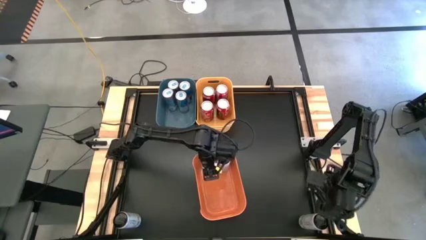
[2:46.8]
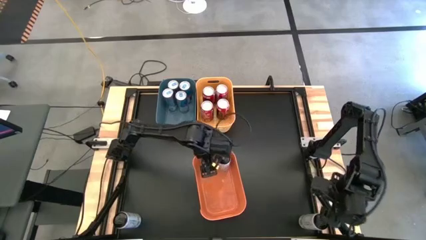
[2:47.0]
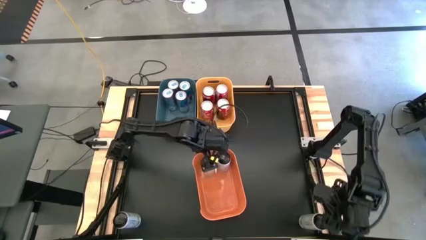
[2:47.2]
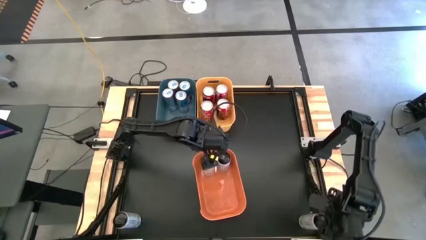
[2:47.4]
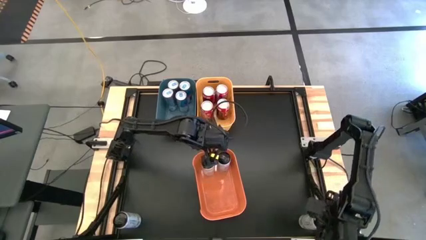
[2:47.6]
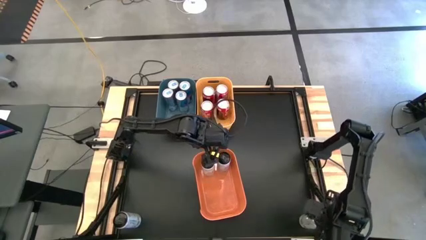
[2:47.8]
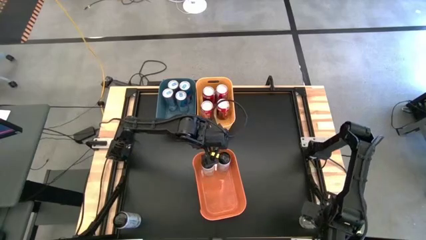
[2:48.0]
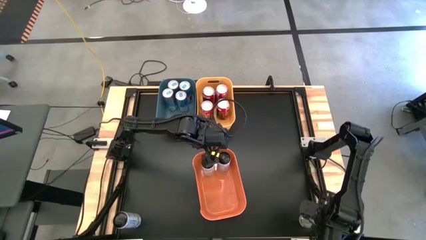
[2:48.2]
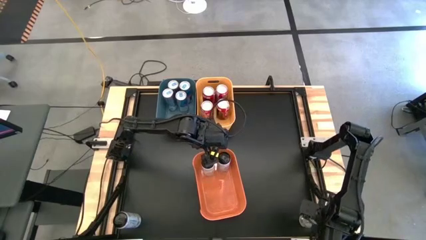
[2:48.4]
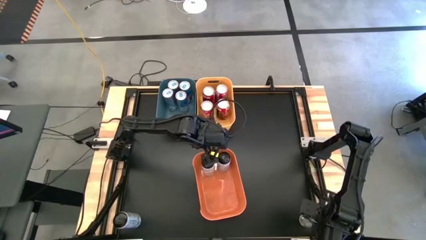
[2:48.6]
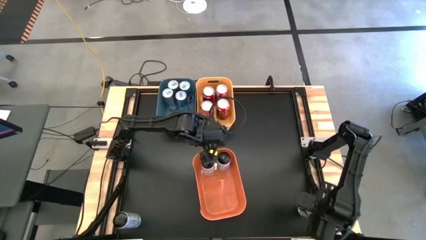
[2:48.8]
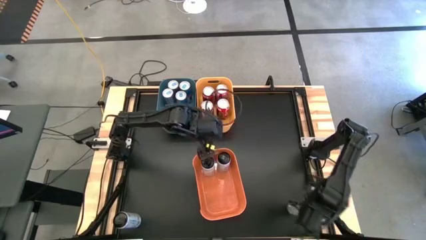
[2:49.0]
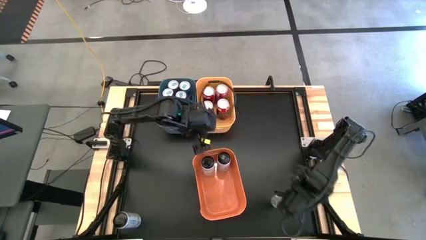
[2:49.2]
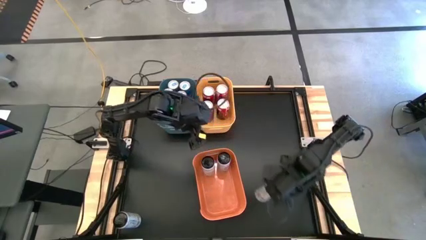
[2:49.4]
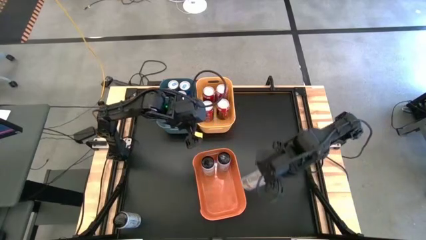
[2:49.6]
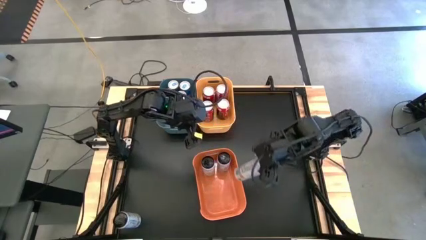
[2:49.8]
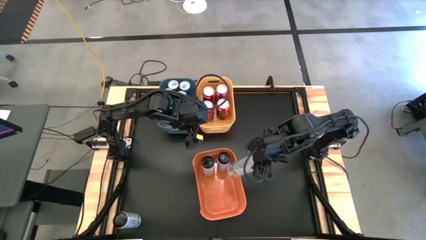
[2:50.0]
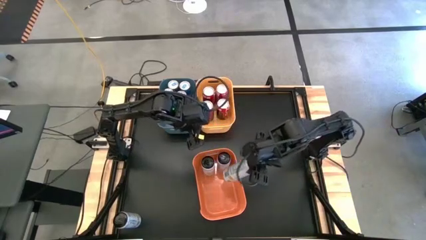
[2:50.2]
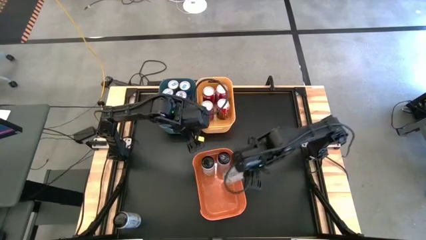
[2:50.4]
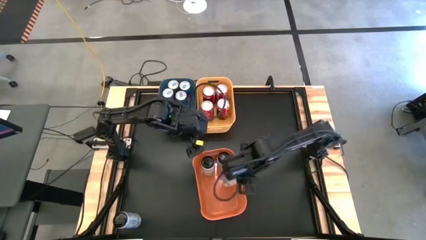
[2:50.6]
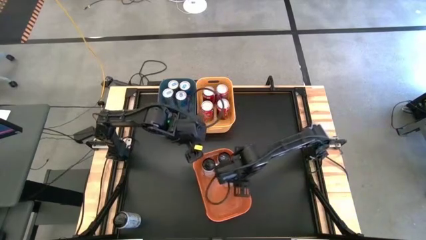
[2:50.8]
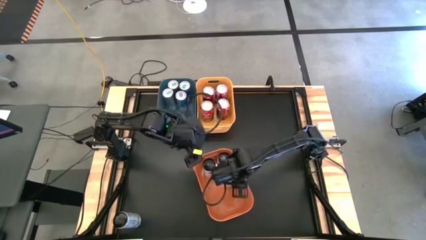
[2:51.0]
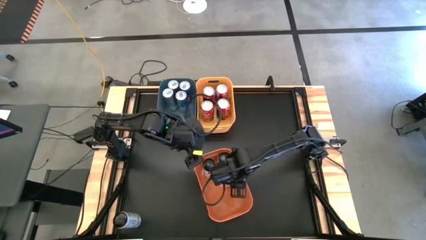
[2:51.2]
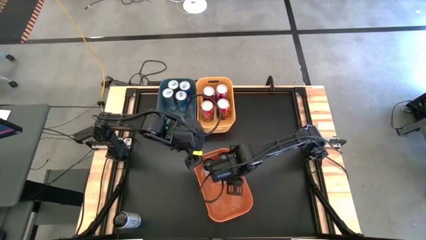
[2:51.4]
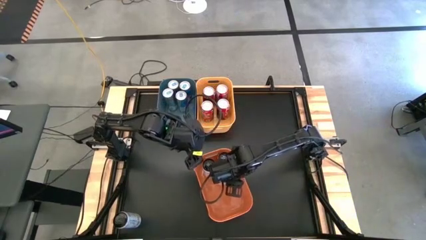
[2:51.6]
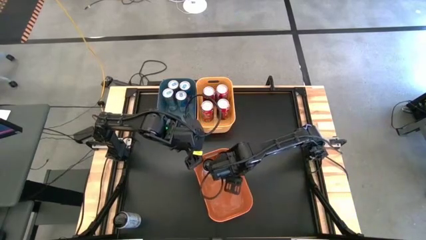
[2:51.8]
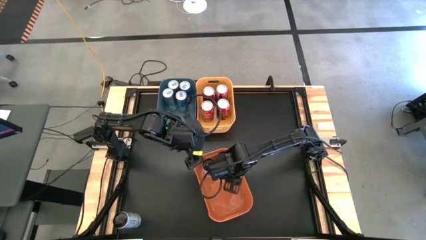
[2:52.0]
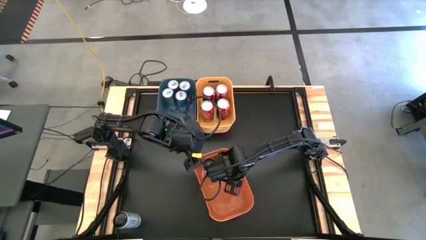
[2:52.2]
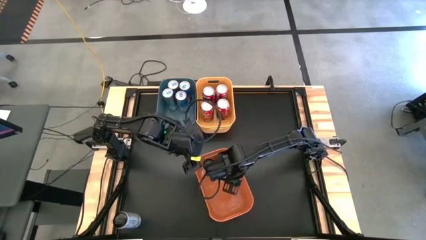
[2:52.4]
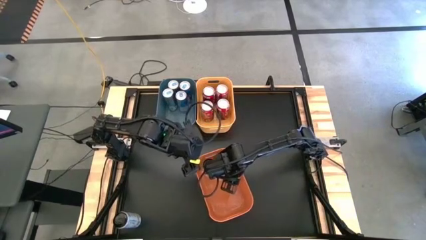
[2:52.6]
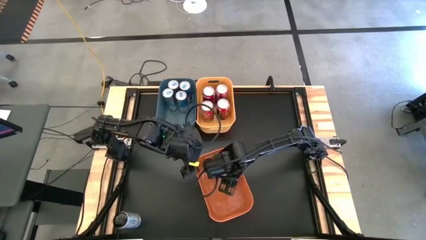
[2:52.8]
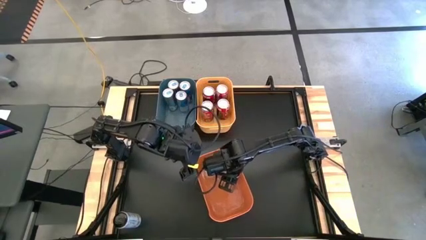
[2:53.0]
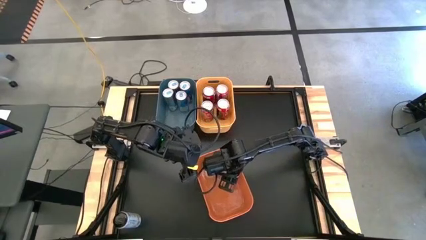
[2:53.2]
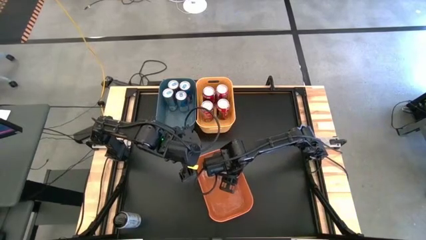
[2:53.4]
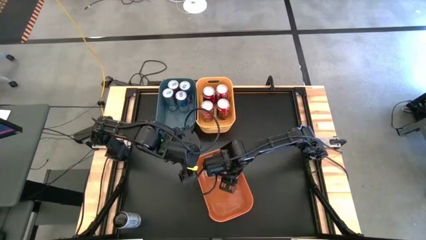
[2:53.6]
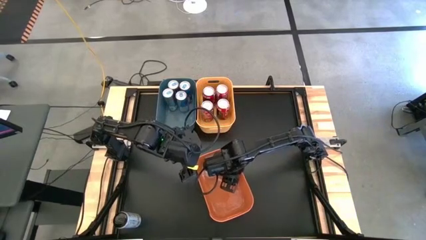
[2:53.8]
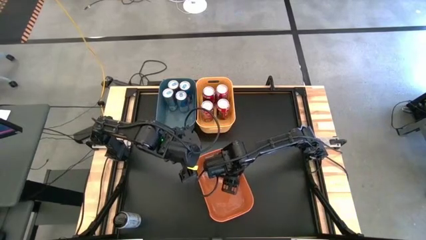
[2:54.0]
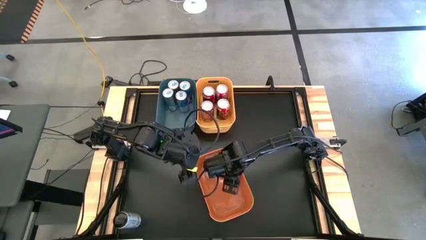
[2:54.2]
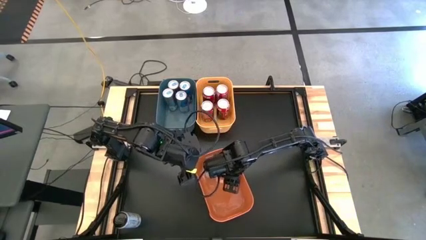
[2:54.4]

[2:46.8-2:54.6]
Task: Sort soda cans
Put the right white soda can into the orange bin

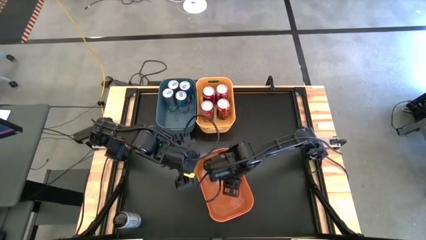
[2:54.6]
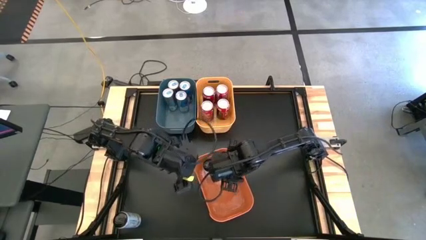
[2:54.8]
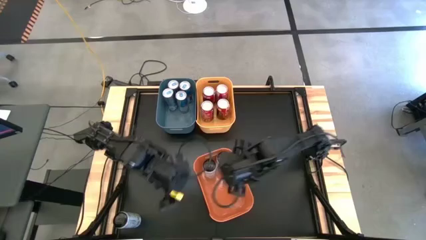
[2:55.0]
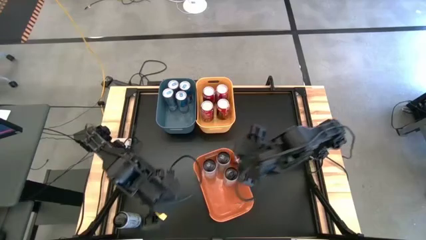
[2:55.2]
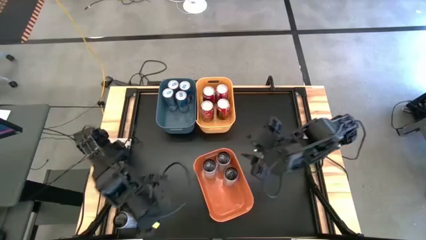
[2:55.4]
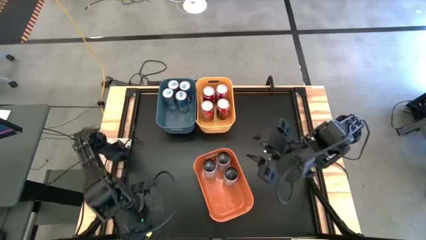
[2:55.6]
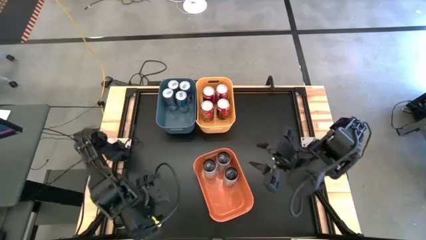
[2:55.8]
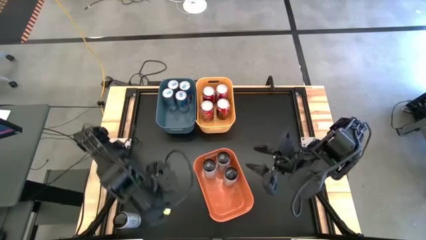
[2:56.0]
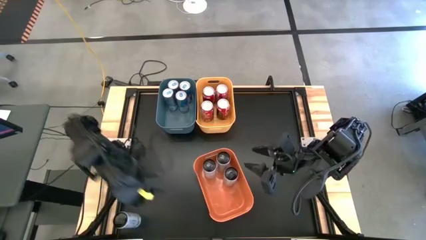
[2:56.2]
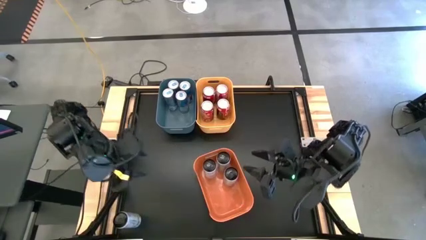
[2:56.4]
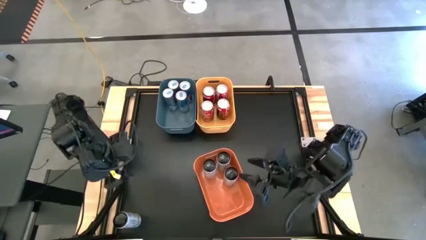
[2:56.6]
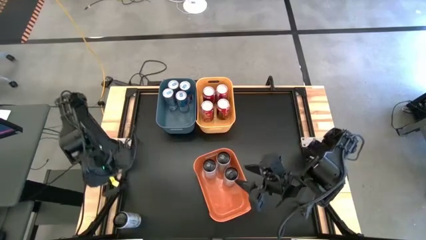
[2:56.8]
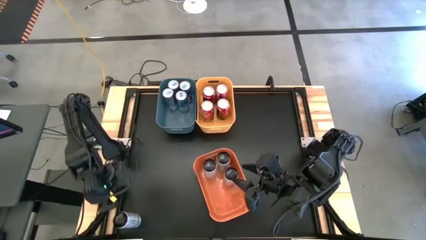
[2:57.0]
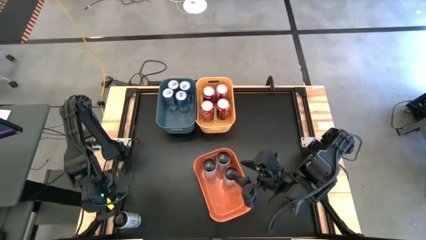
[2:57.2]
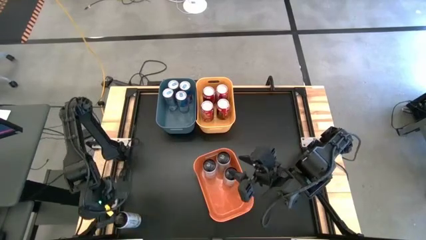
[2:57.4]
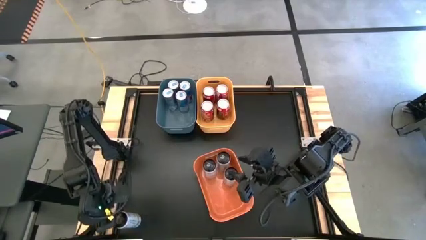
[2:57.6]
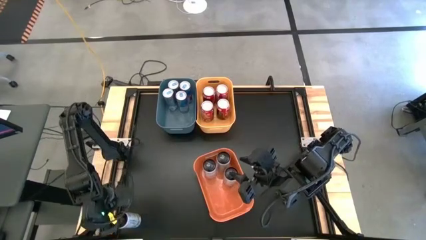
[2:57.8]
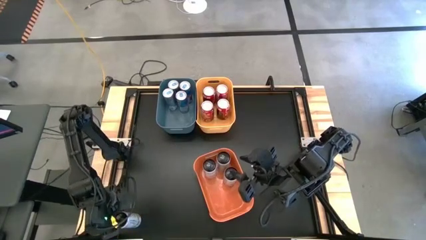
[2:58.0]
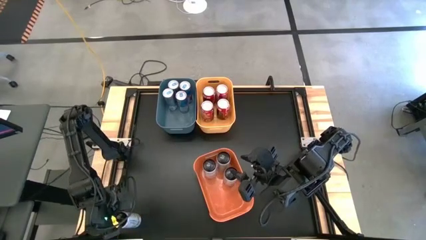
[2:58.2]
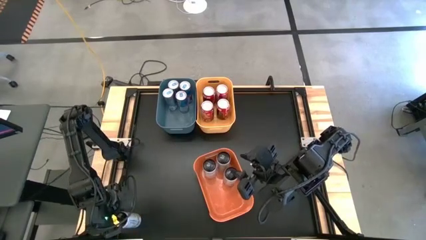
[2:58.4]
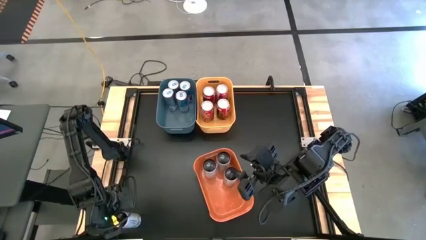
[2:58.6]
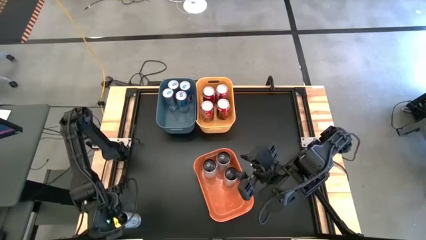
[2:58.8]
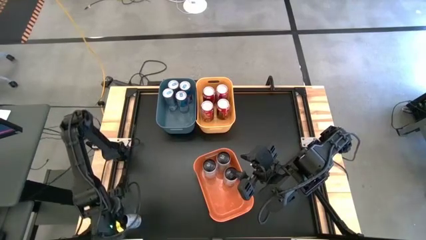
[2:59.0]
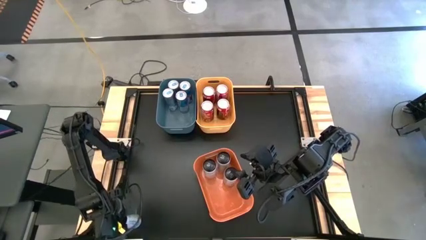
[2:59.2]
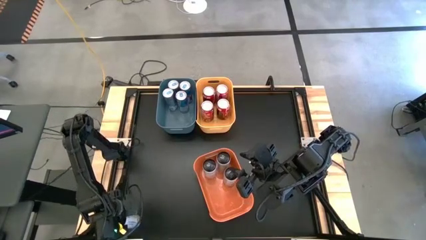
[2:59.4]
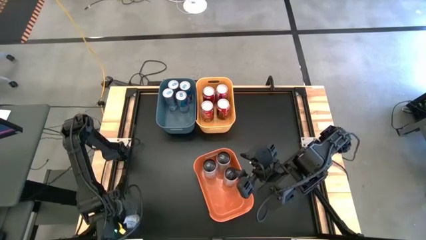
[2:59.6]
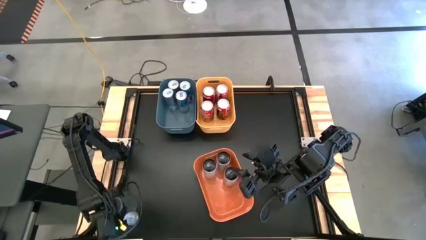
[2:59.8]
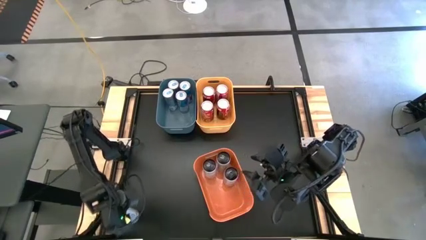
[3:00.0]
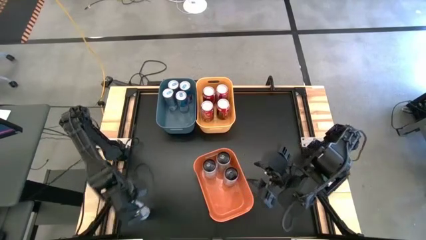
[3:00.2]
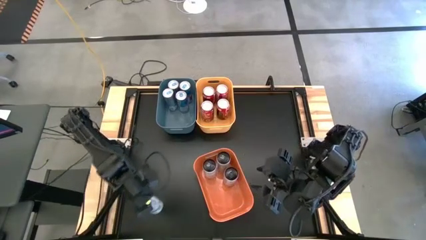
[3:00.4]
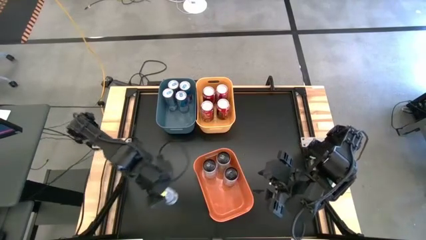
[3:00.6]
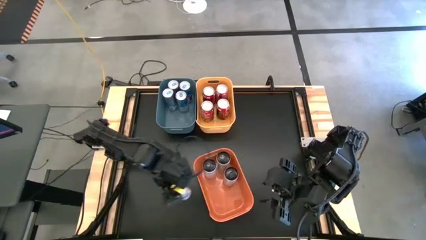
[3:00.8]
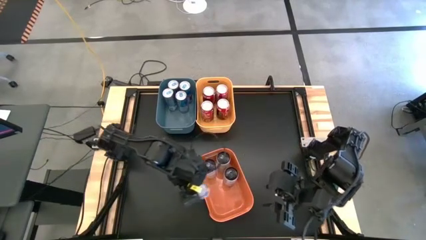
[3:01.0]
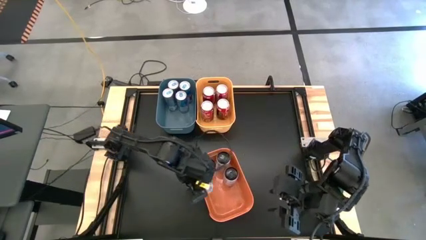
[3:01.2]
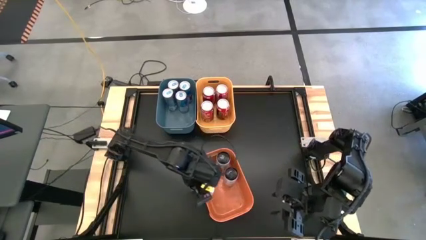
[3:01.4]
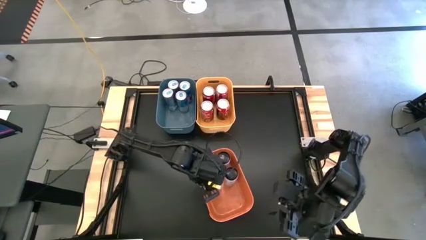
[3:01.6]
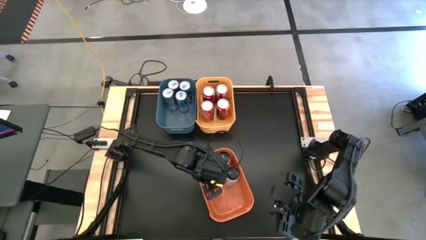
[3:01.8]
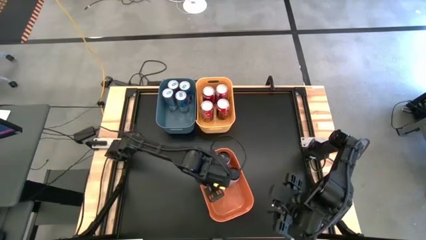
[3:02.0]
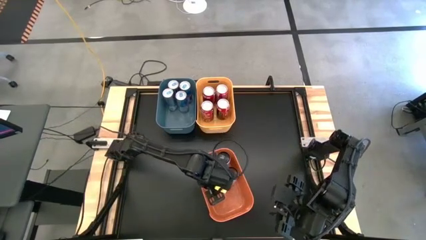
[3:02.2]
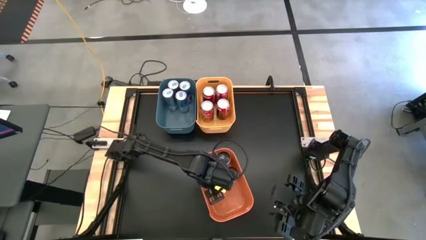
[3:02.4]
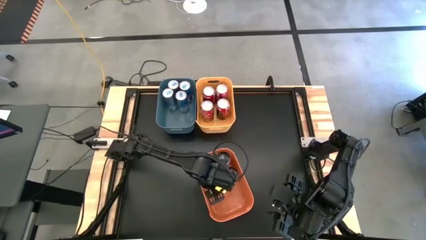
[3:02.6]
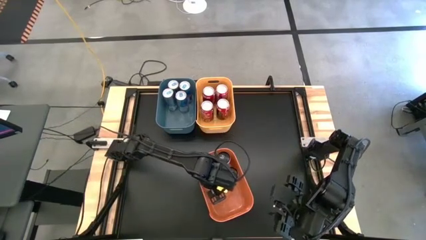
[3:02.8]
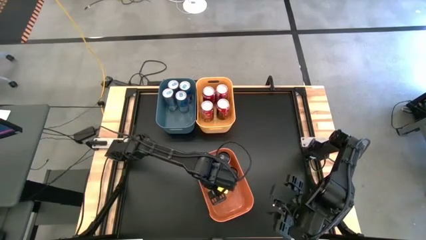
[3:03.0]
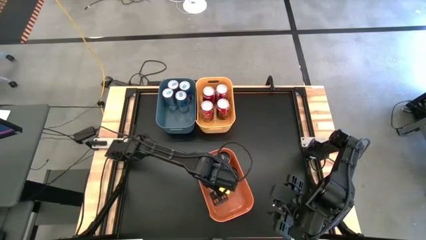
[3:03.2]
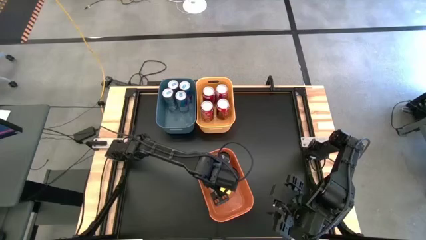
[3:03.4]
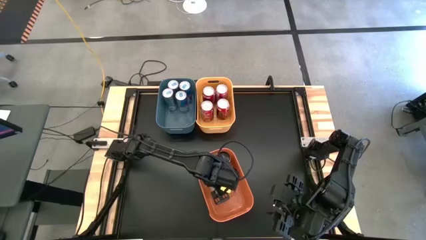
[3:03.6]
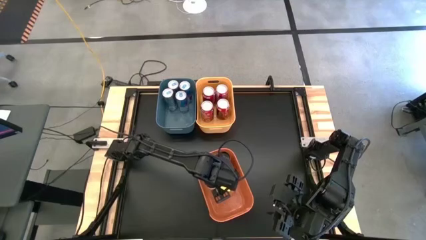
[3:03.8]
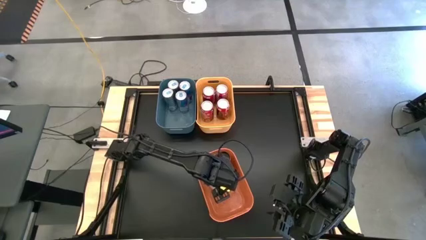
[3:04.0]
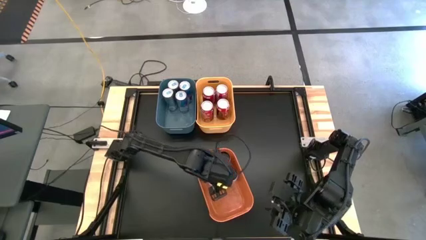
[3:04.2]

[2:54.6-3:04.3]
Put the white soda can into the orange bin
